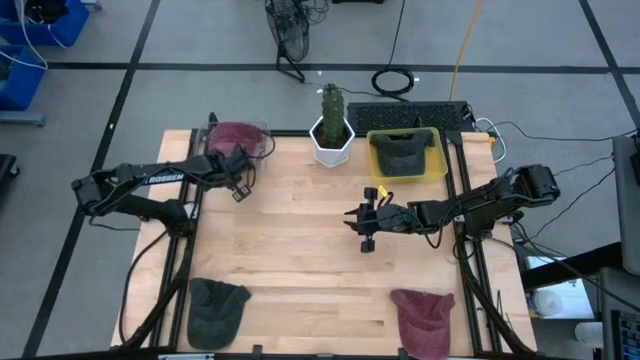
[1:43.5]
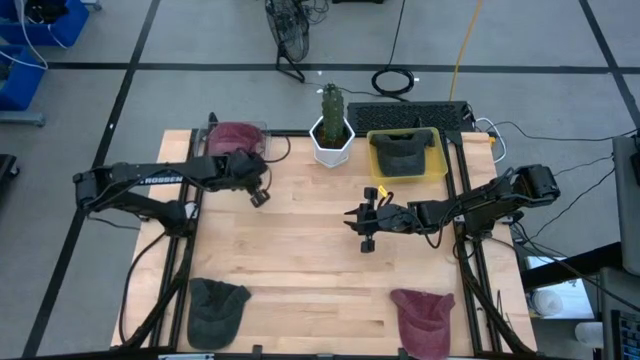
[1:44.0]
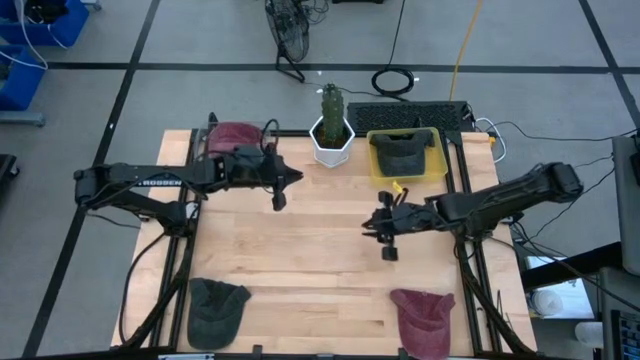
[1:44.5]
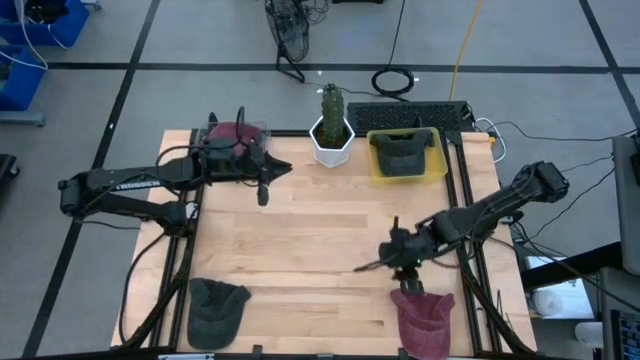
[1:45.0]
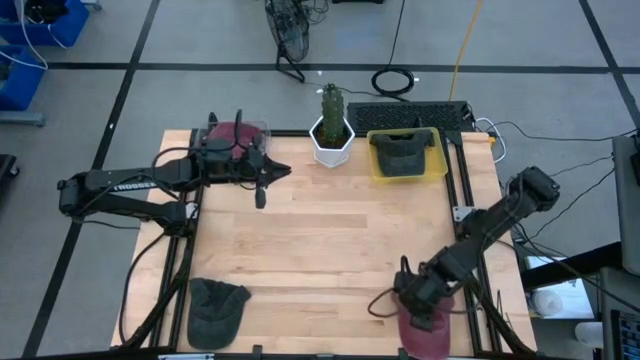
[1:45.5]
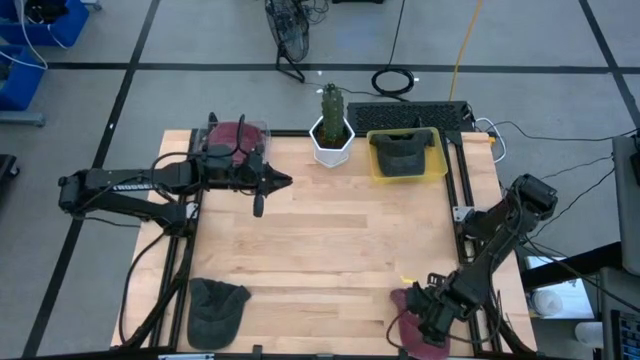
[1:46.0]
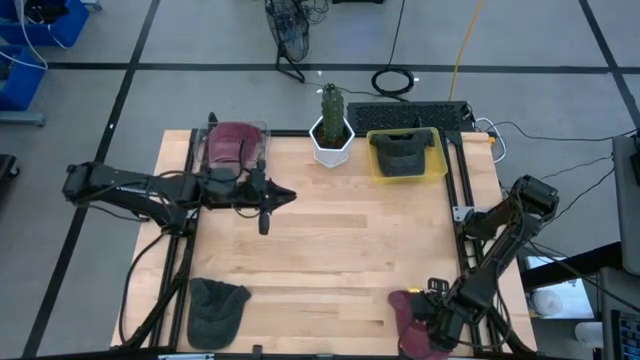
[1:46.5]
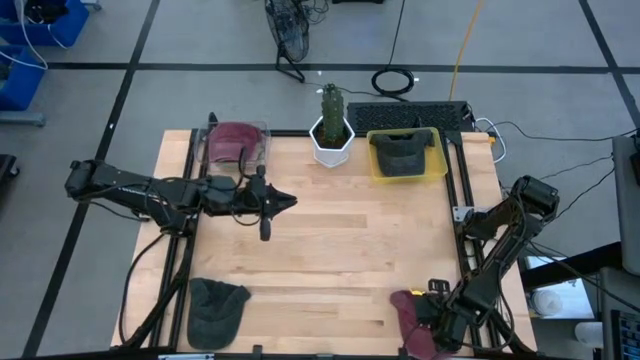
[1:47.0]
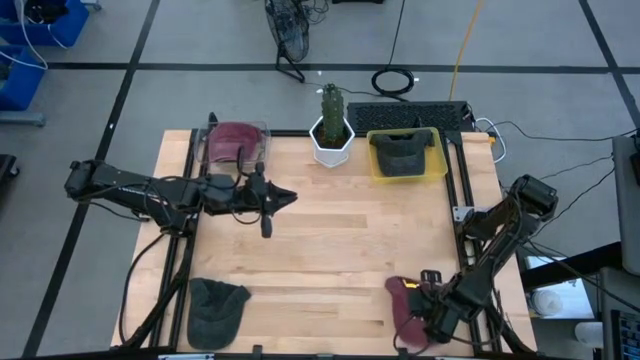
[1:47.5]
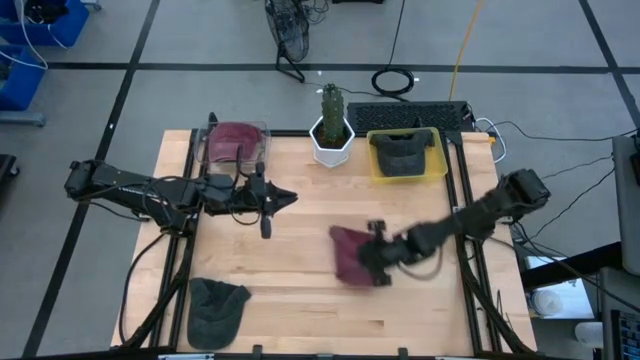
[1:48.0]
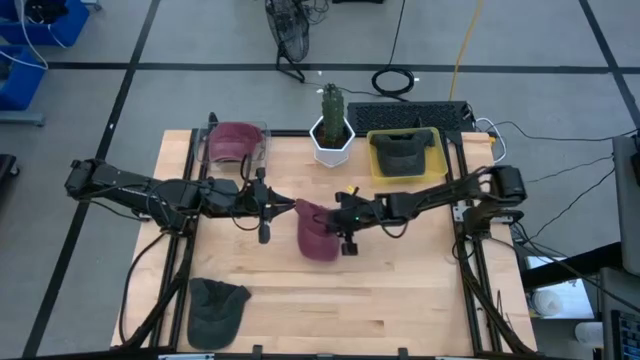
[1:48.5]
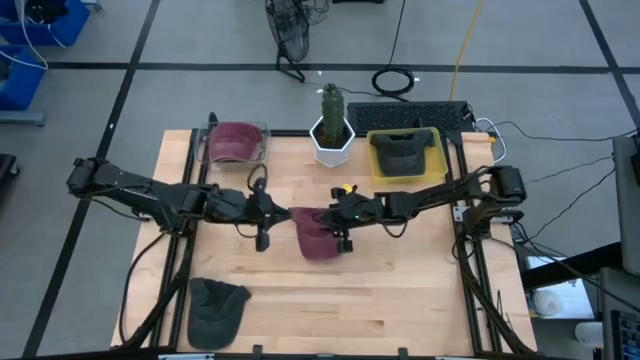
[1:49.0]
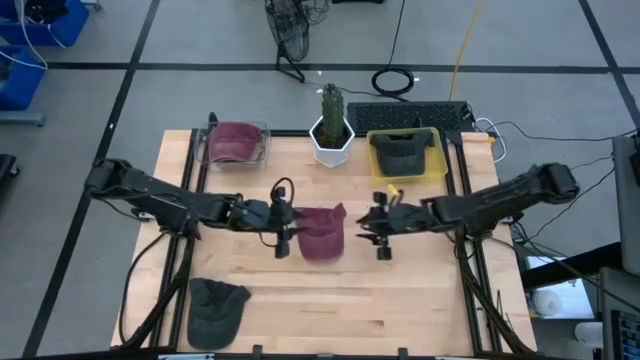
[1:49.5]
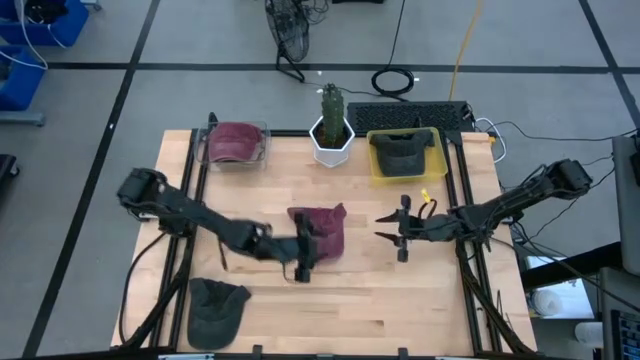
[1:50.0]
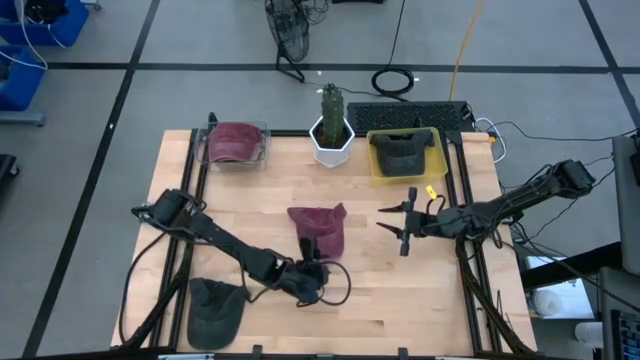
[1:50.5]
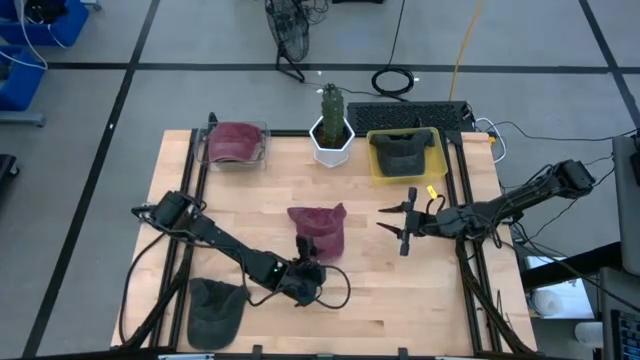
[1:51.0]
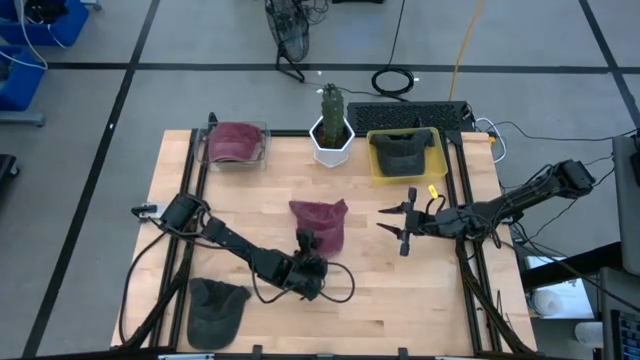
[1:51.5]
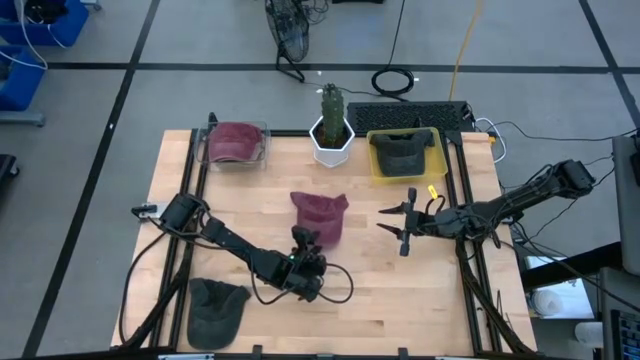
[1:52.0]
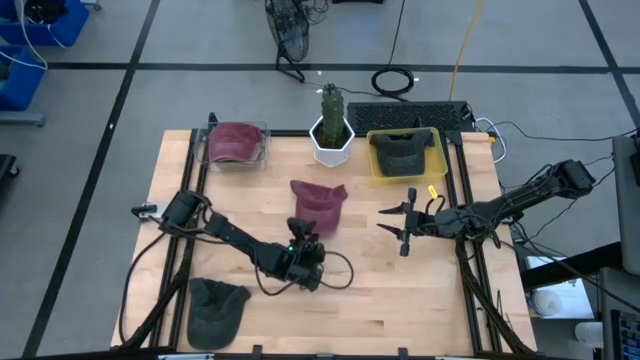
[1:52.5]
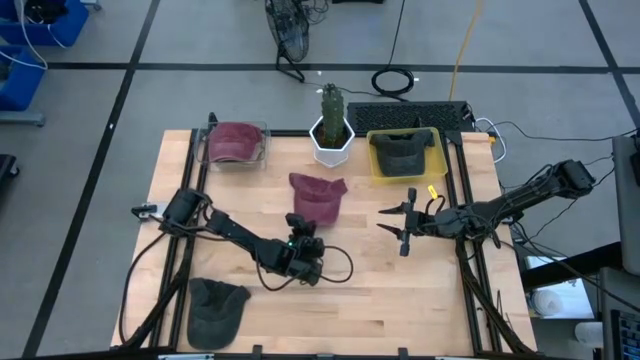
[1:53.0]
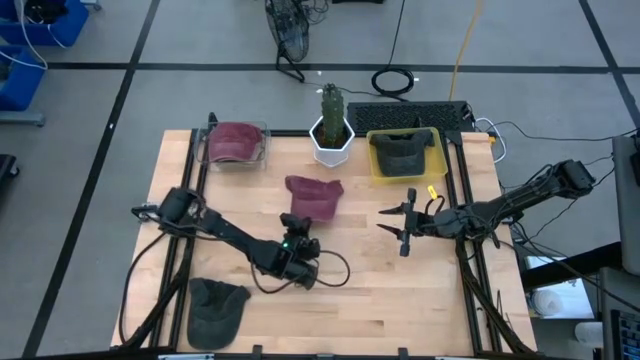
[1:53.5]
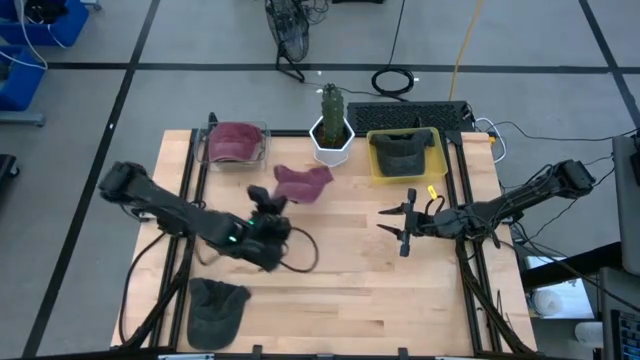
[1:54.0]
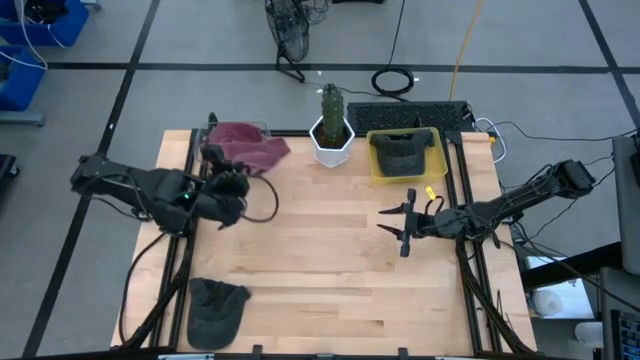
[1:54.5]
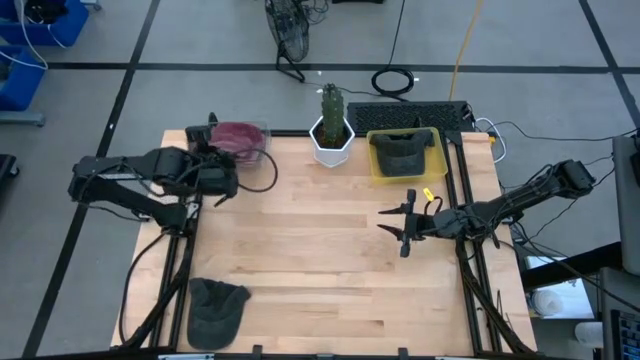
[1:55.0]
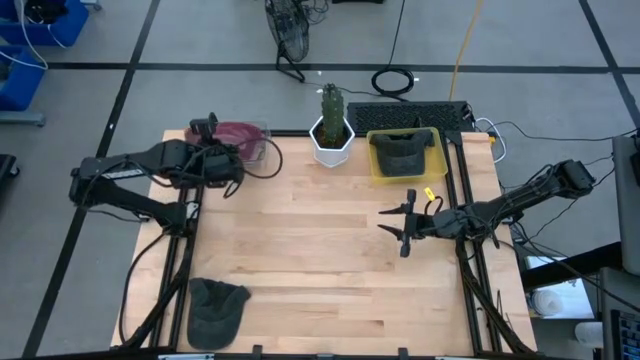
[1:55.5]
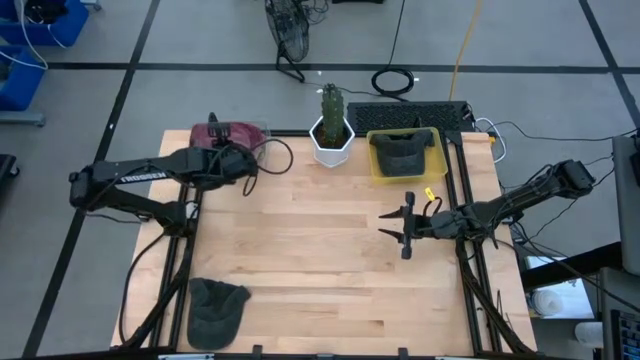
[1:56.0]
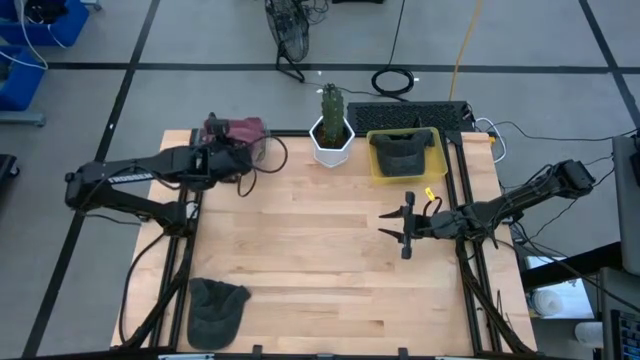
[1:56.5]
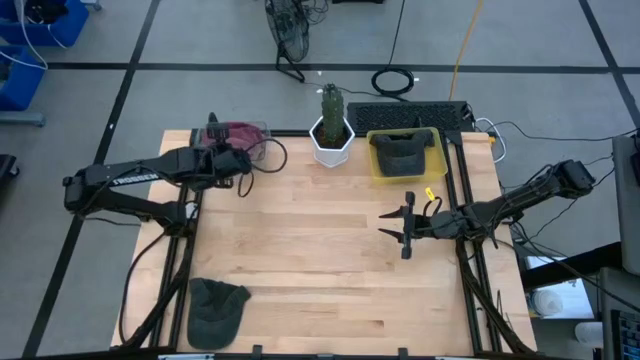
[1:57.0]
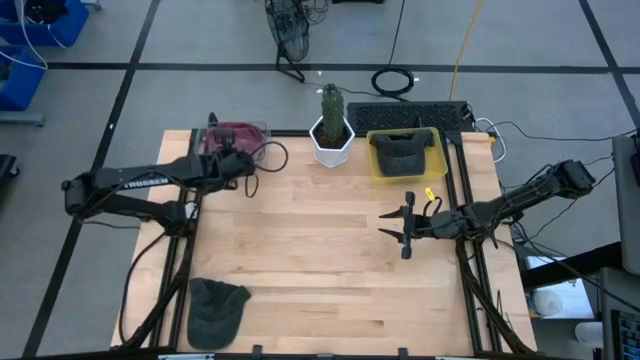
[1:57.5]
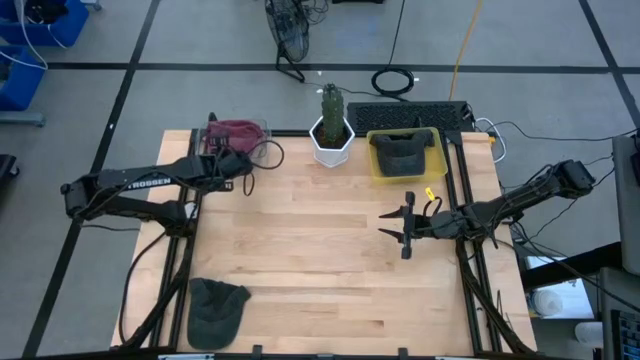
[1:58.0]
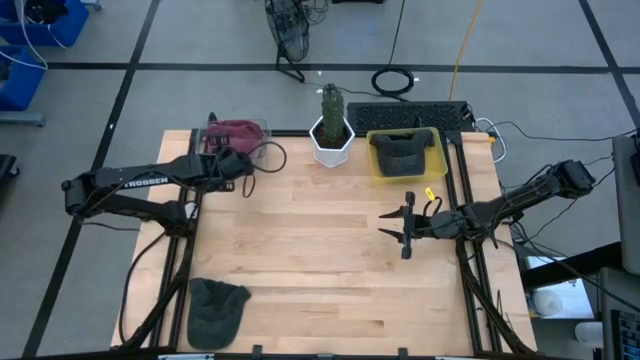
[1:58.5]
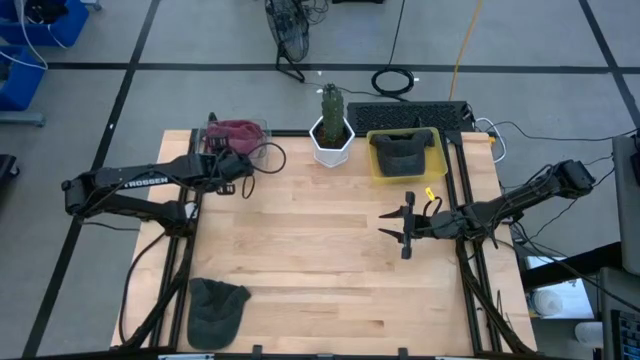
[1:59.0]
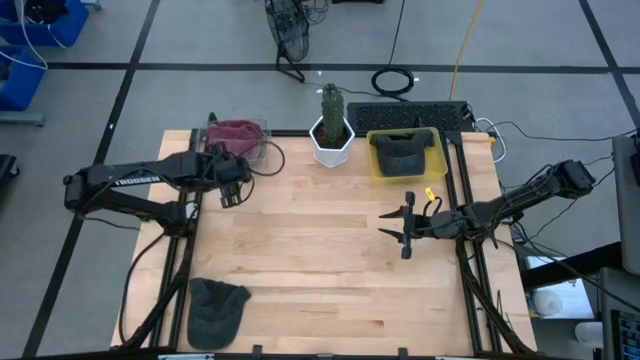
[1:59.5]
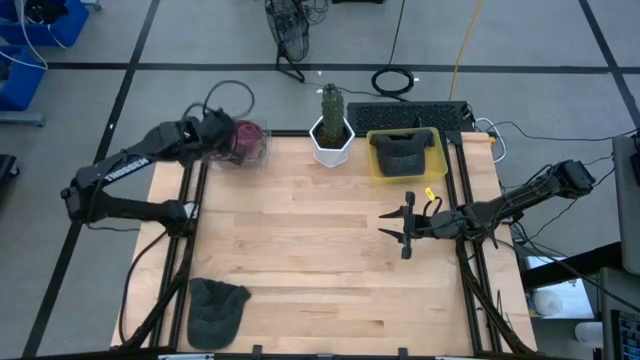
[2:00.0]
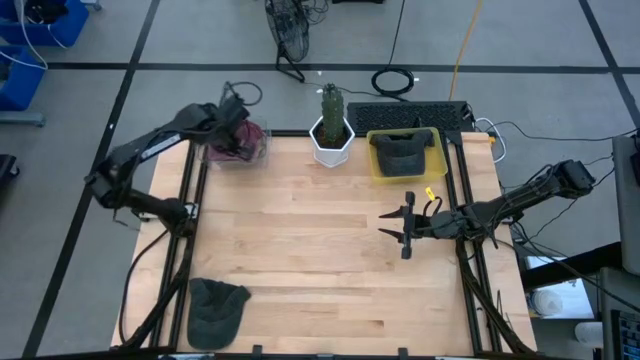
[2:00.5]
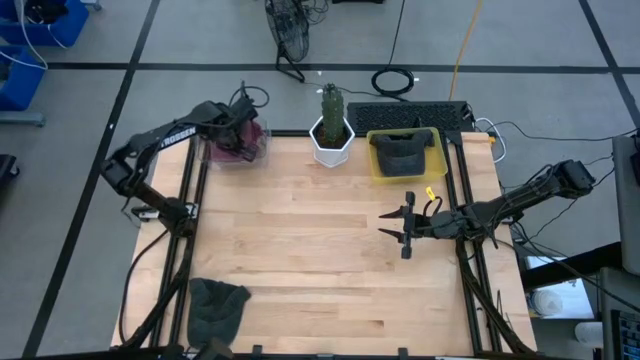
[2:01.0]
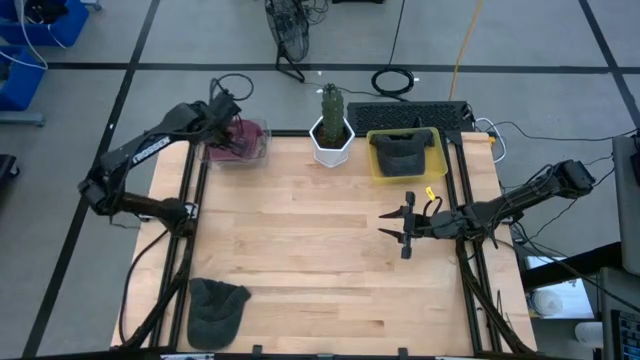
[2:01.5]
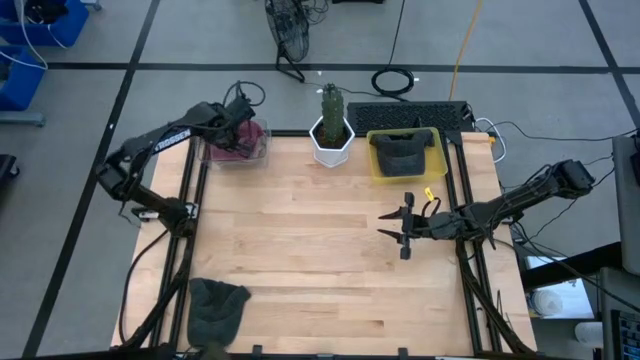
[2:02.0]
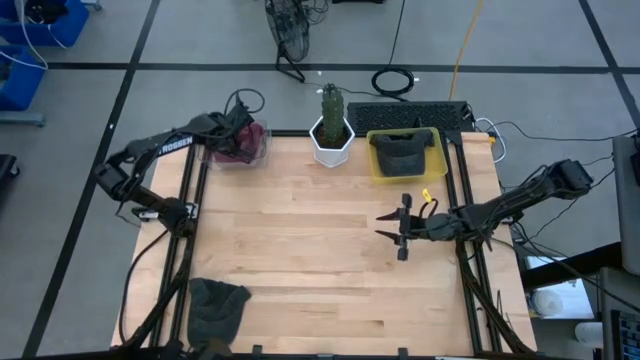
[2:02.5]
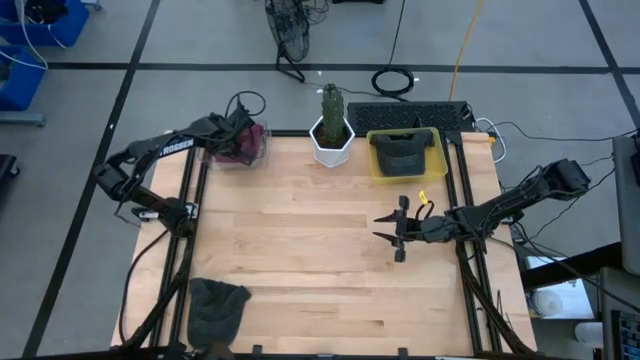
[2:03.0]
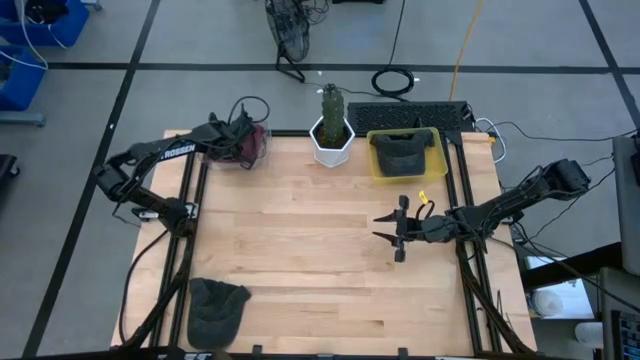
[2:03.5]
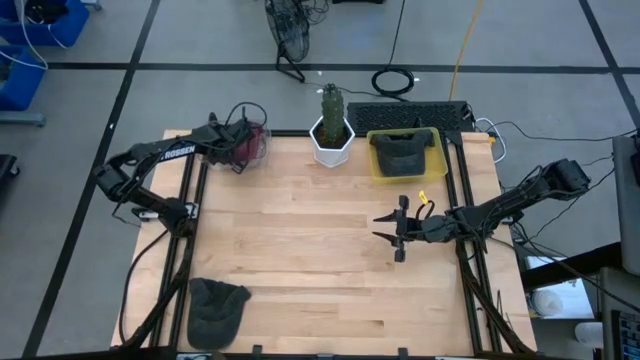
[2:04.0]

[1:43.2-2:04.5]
Task: Pick & Place hat
Put the red cap into the transparent bin

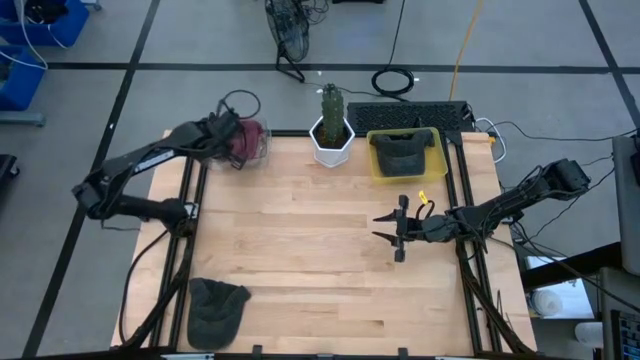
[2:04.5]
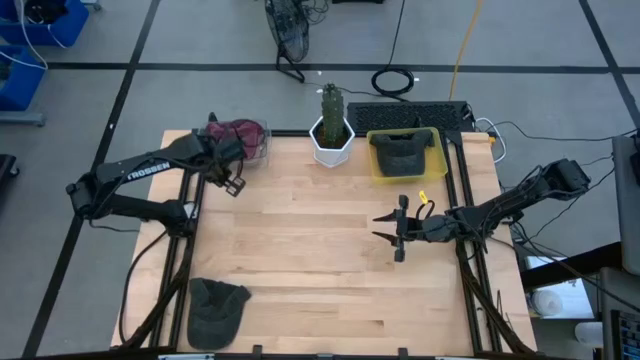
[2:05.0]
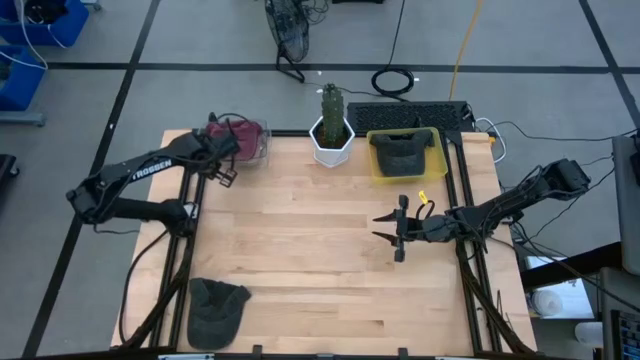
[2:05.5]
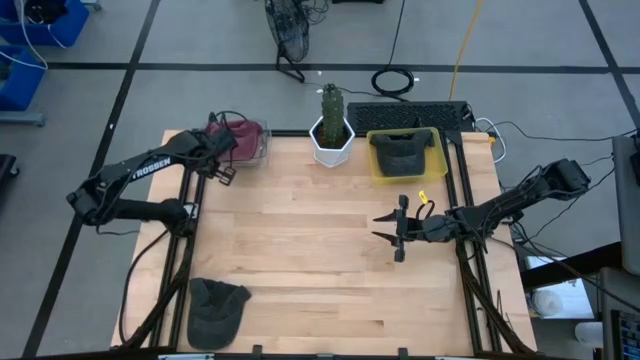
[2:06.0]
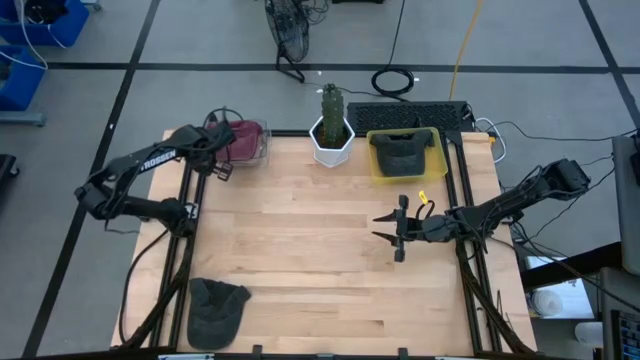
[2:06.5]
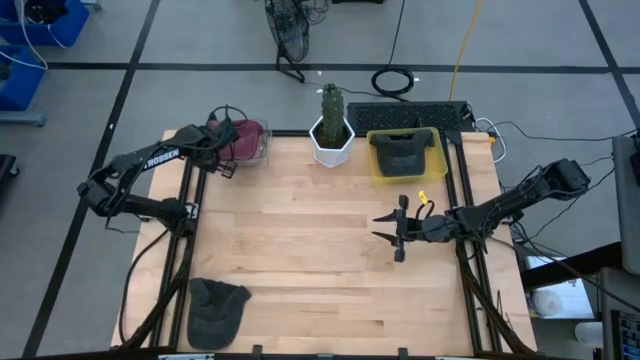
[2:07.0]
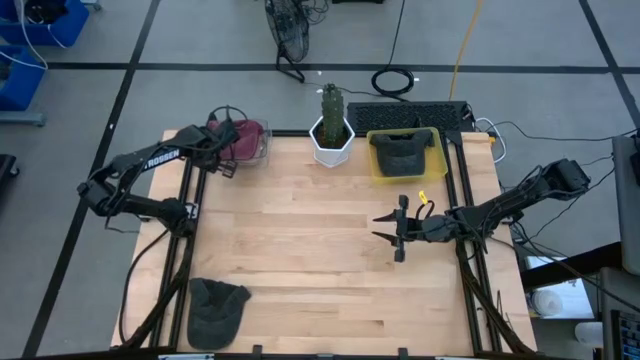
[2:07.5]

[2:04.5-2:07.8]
Adjust the transparent bin on the table
